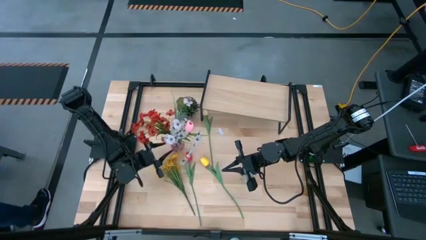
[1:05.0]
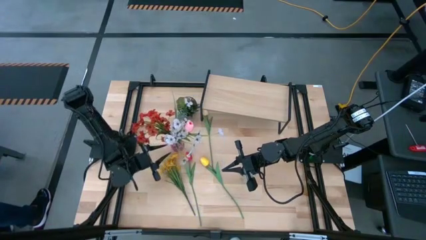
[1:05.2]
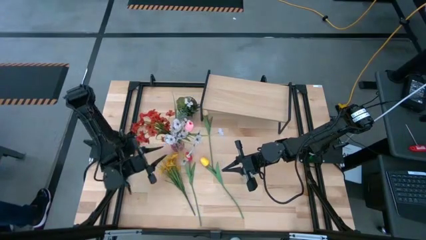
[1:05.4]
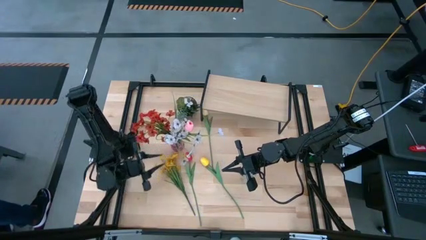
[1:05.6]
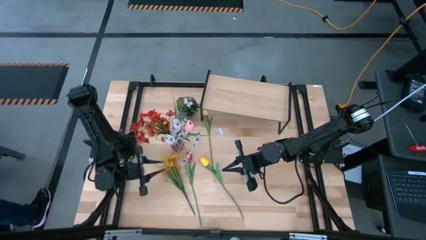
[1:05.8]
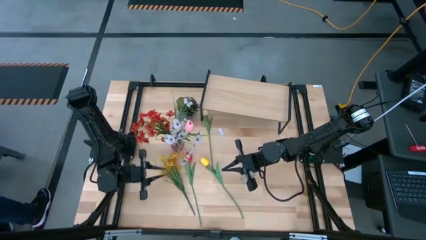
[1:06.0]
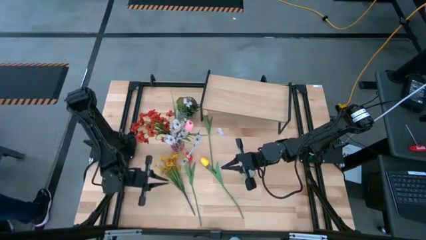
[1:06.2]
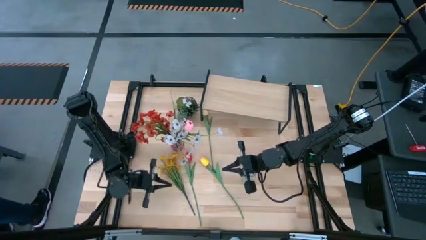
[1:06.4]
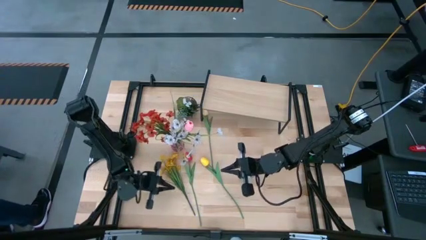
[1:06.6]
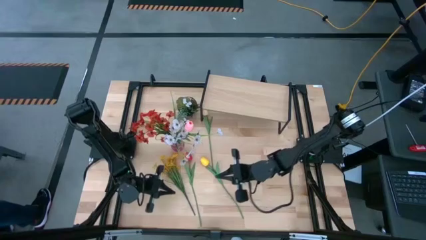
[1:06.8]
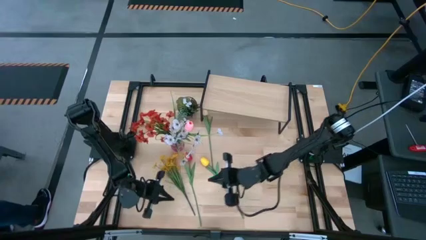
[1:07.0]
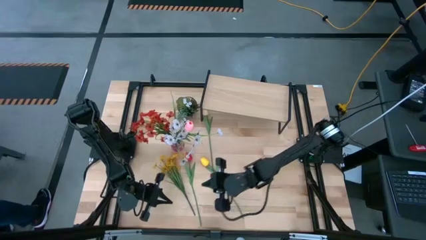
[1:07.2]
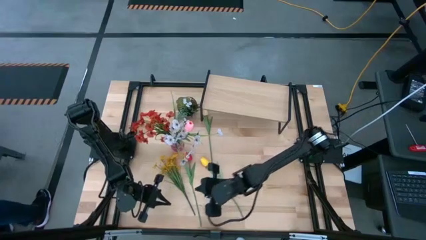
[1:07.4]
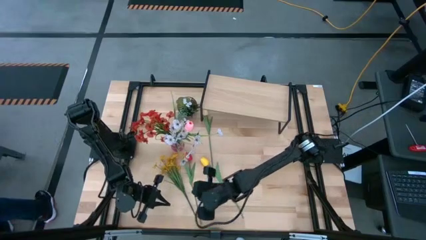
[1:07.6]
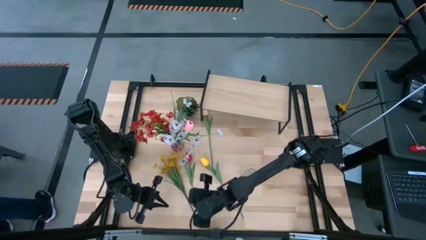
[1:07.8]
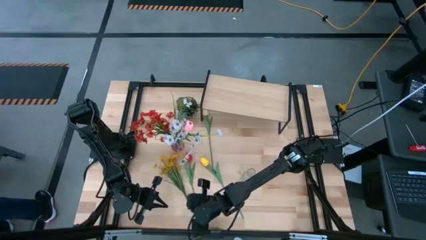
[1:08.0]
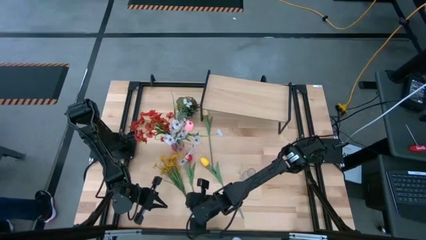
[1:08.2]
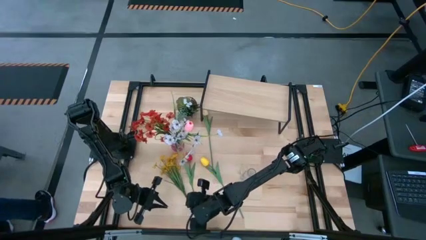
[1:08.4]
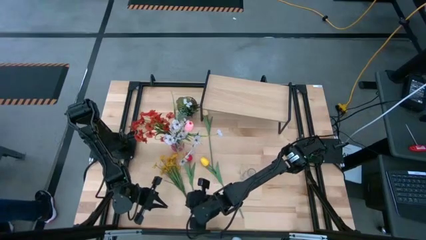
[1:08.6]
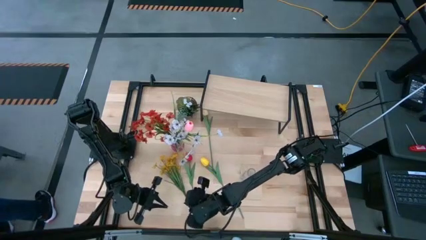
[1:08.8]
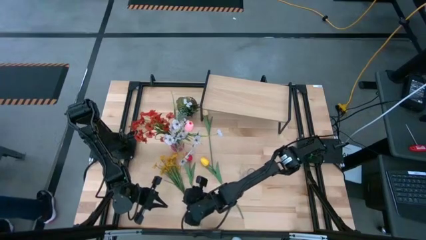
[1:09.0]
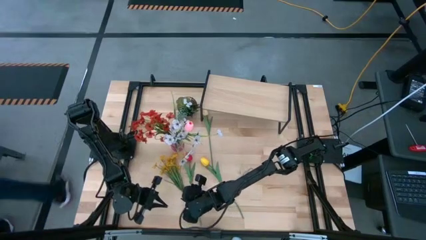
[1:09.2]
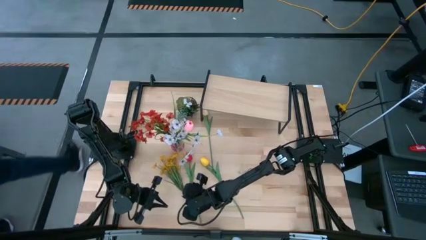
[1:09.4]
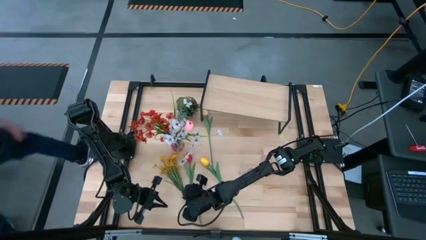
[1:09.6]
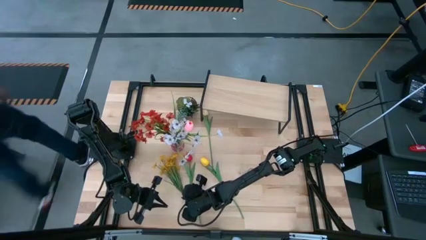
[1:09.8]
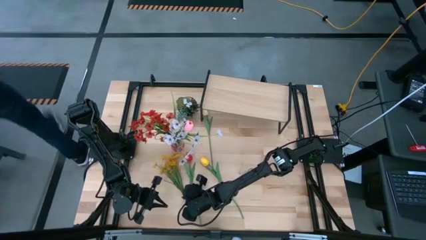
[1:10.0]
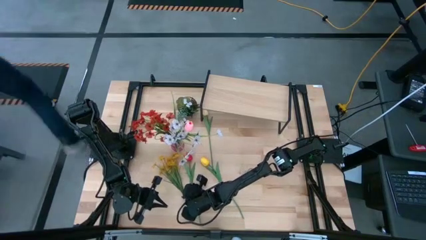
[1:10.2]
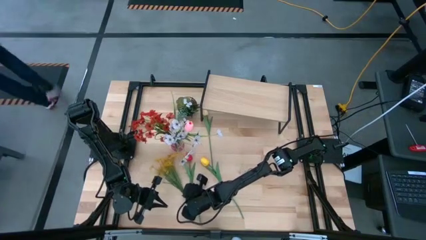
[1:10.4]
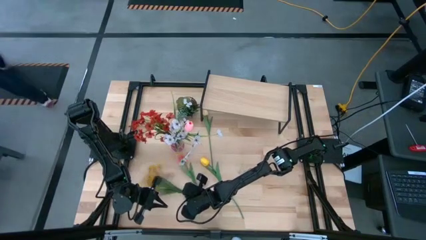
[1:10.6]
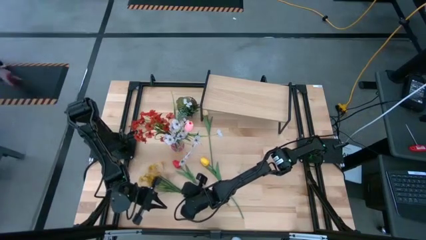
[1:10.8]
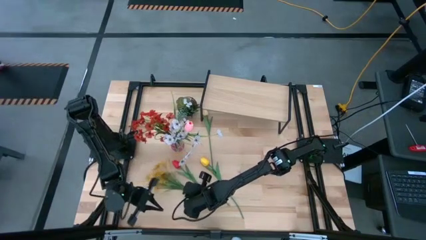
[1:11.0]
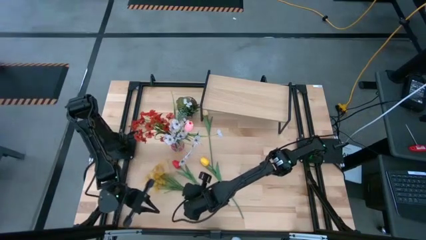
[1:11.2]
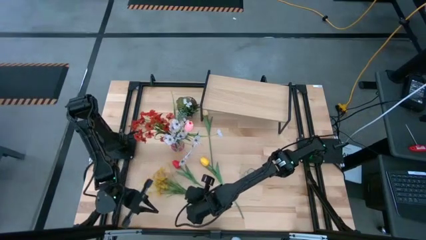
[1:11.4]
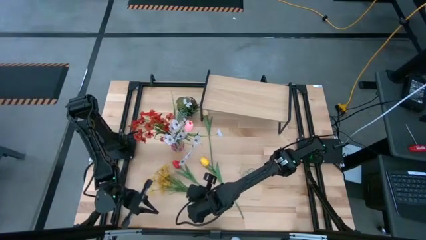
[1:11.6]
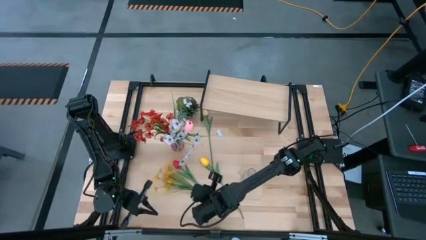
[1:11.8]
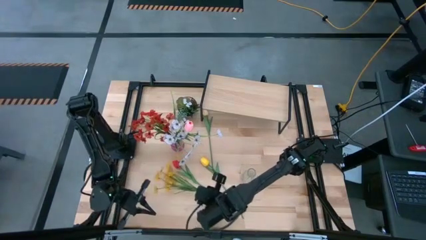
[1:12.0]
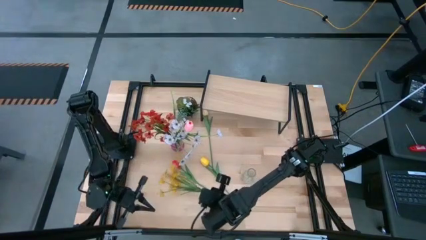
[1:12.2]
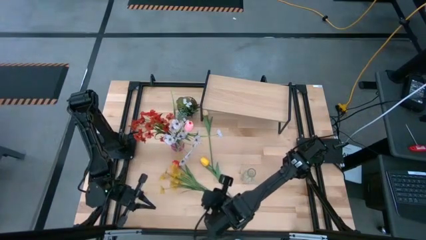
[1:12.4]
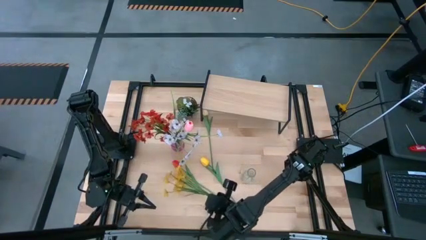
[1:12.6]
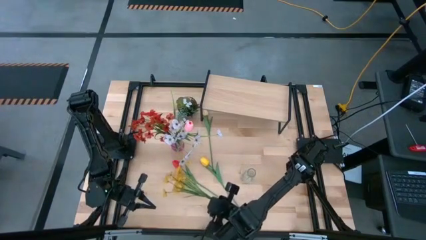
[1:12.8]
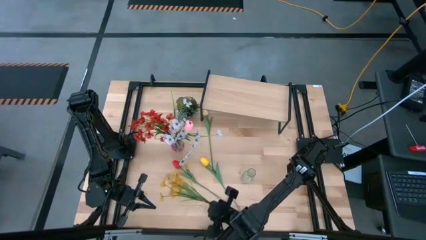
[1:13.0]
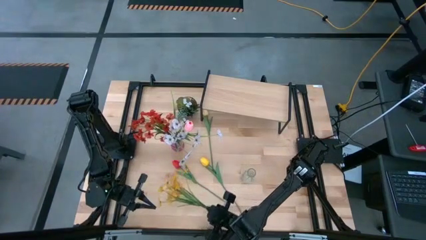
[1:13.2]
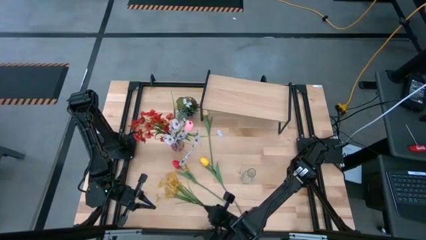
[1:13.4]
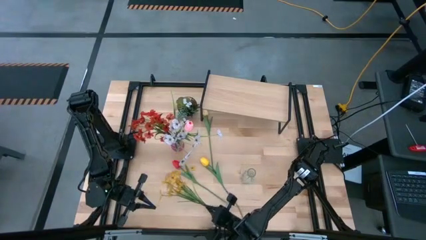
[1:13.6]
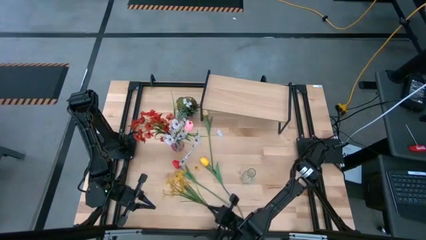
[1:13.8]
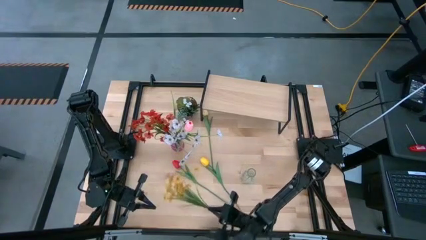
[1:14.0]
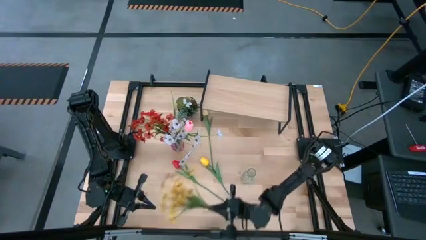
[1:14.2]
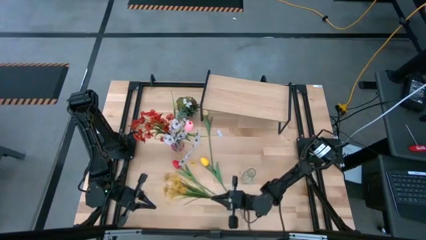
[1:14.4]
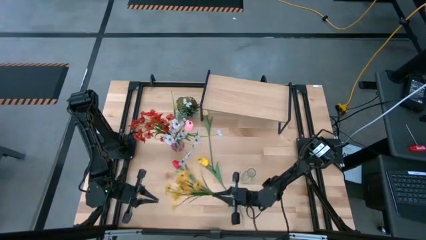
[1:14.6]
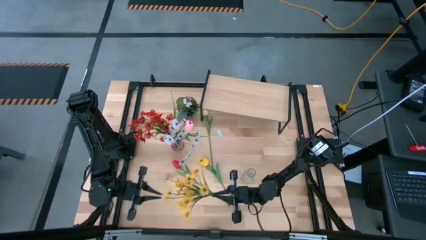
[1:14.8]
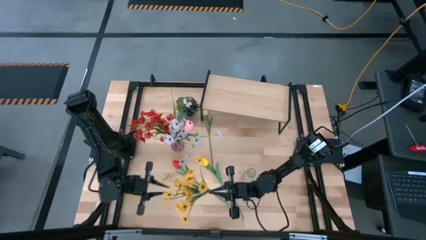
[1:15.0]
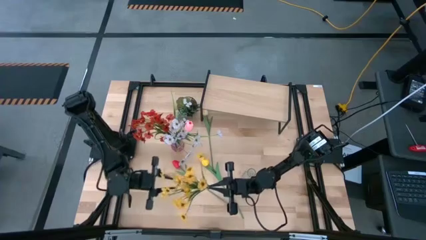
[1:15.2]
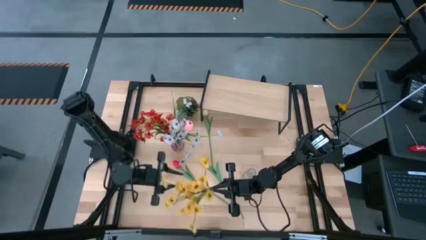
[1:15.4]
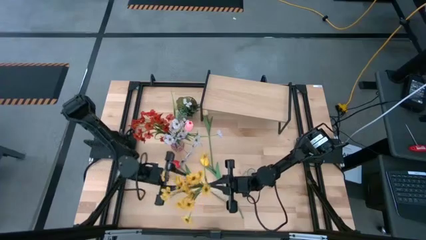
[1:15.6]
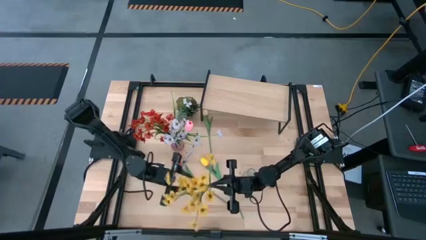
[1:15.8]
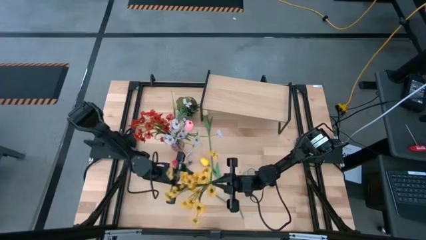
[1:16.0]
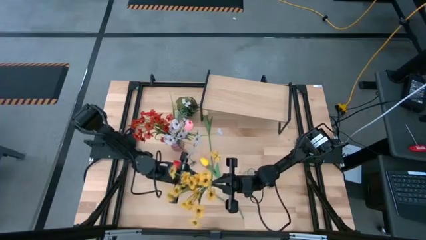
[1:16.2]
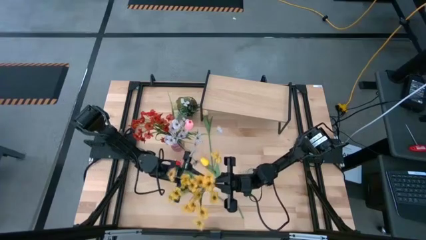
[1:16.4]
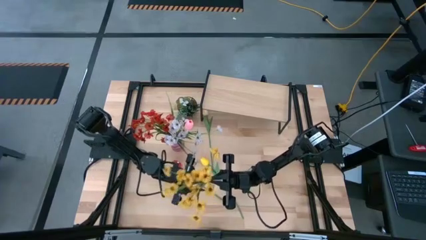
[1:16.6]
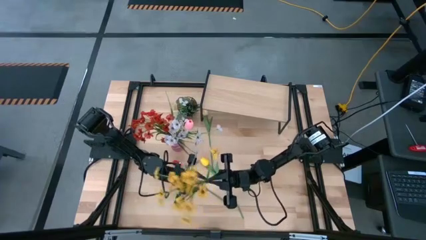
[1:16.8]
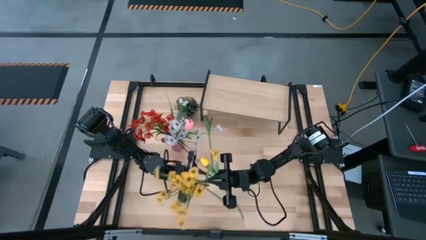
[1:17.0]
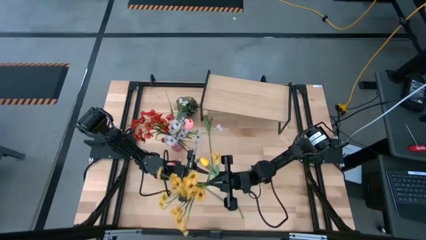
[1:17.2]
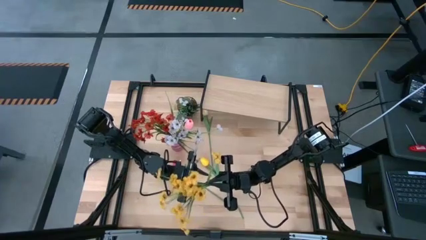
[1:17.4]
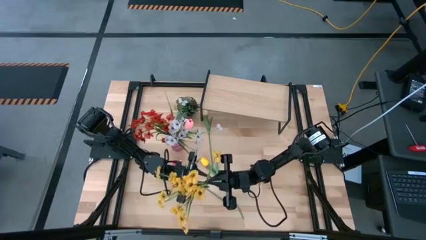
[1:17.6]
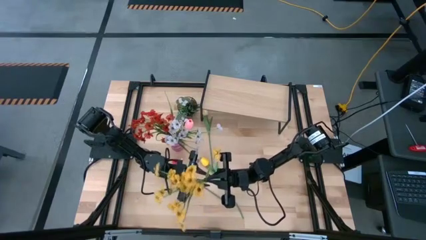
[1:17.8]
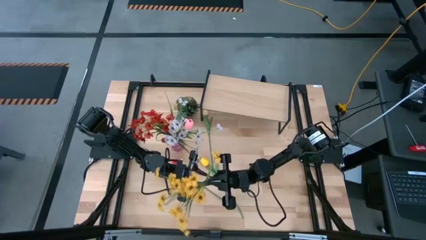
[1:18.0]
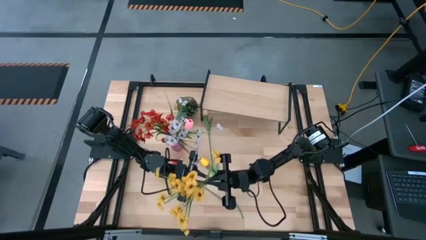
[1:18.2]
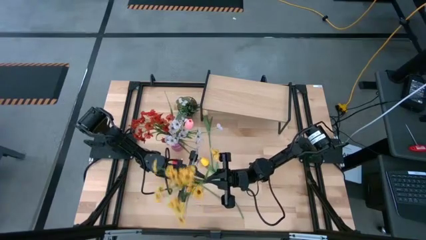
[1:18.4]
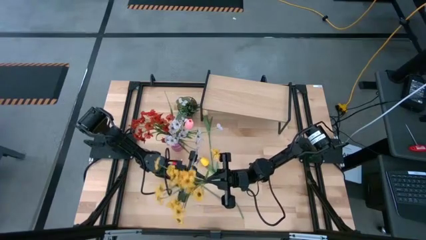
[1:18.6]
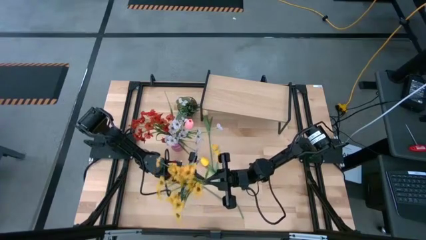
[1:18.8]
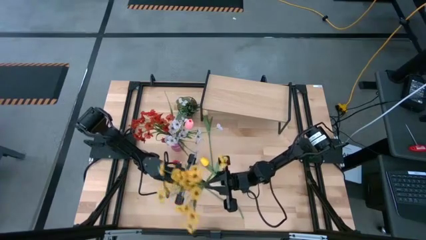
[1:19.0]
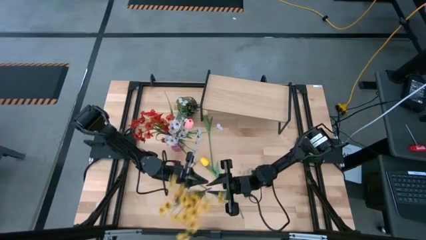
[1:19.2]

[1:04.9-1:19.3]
Task: Pick and place flowers into a vace then onto a shelf
Put the yellow flowers into the transparent vase

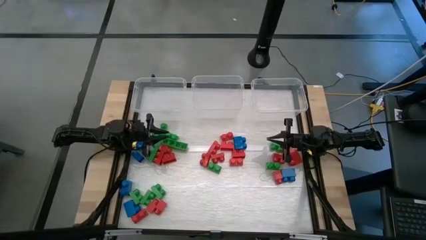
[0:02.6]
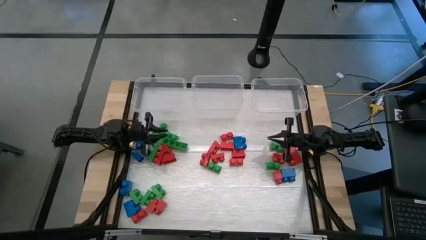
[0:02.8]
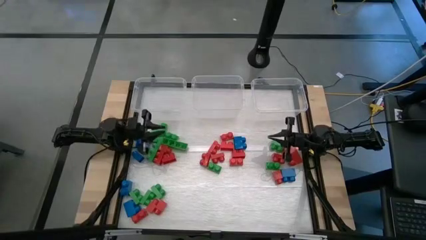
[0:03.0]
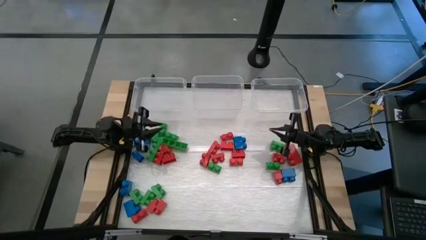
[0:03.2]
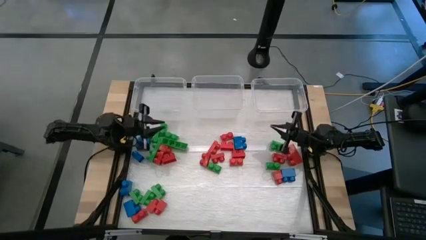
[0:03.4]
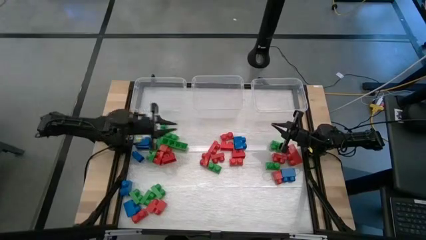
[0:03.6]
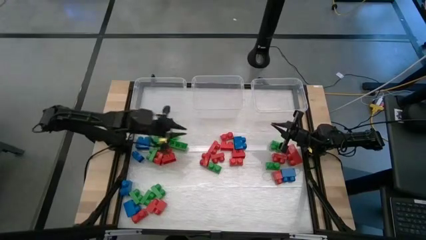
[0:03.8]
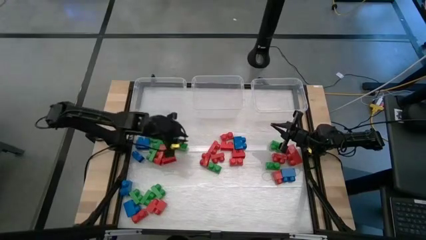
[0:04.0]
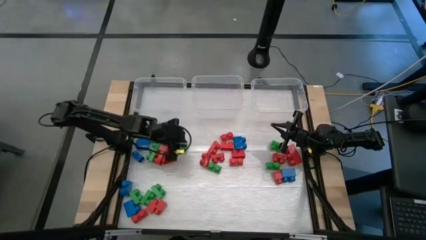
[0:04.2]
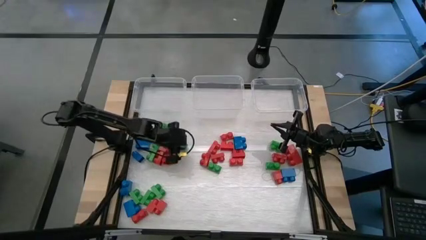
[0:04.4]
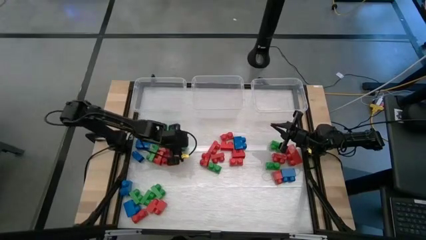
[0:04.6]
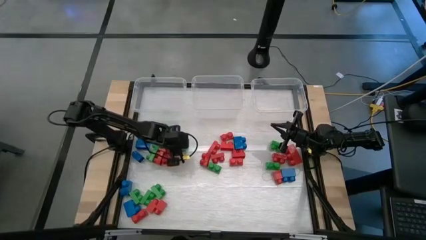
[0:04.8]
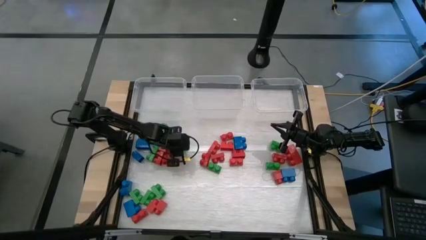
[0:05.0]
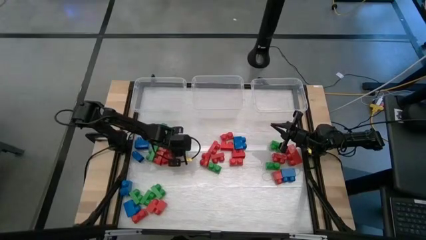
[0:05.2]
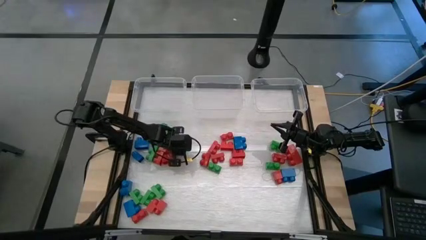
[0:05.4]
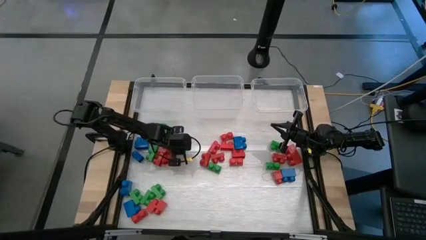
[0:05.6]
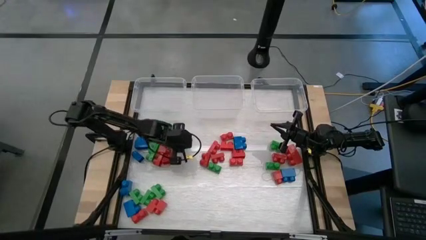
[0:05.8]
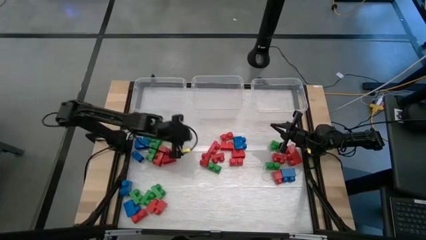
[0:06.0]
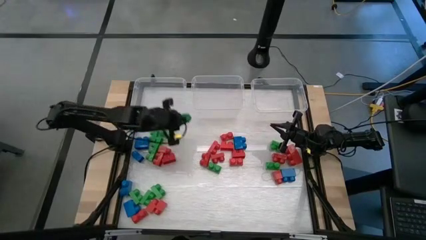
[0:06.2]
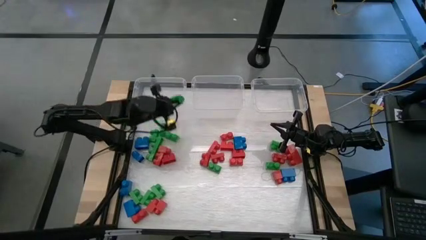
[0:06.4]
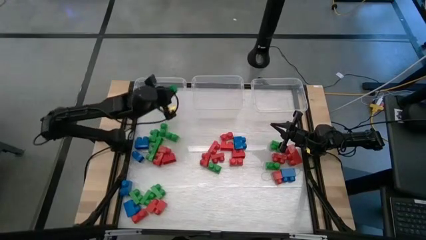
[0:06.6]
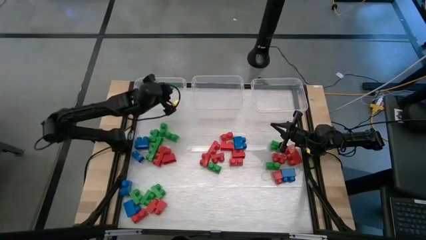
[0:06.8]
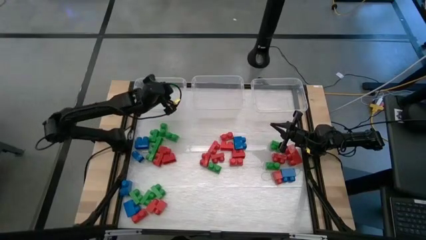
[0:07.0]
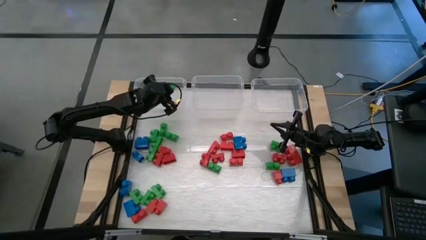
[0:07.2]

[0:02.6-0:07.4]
Task: Sort blocks
Put the green game piece into the left transparent bin
